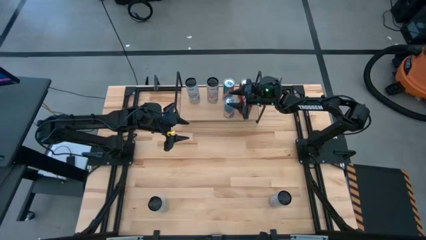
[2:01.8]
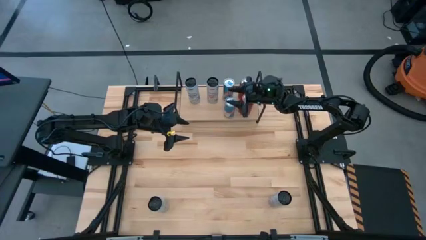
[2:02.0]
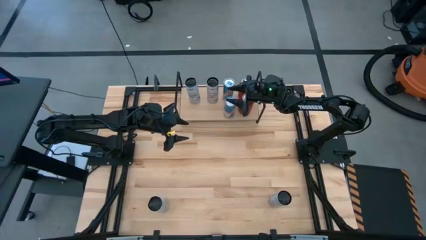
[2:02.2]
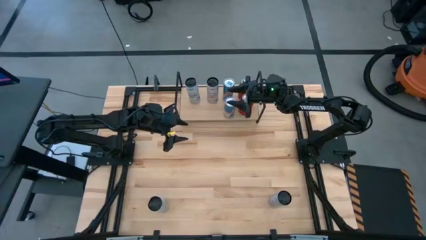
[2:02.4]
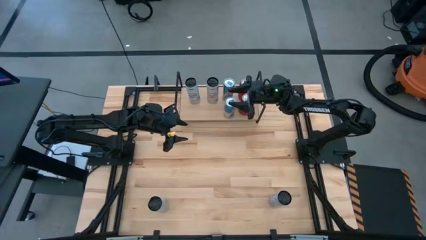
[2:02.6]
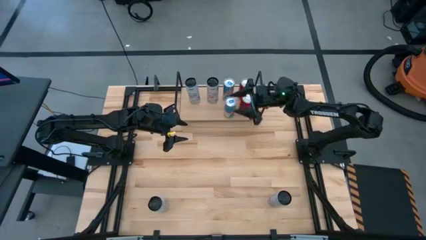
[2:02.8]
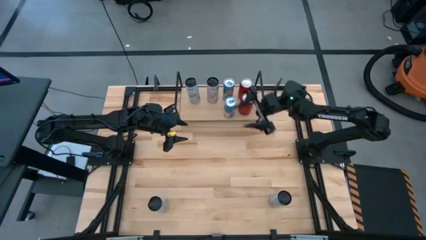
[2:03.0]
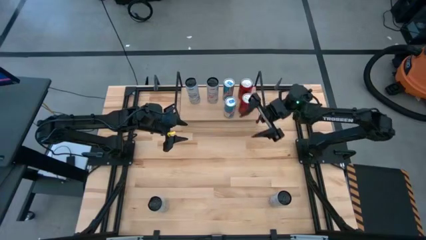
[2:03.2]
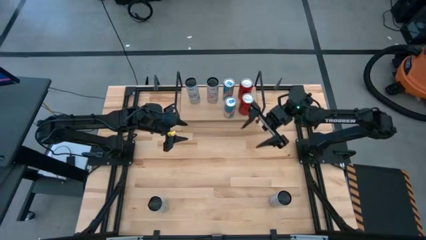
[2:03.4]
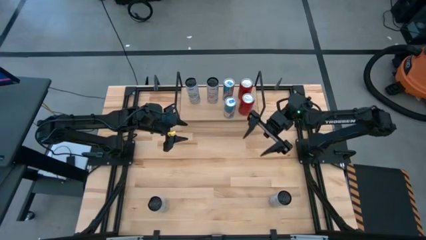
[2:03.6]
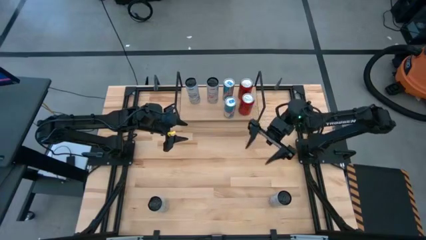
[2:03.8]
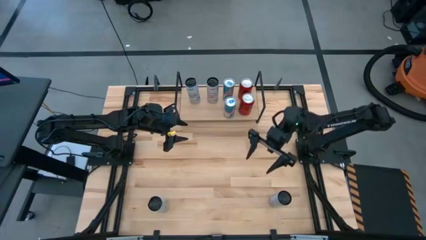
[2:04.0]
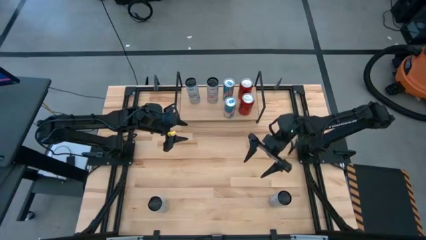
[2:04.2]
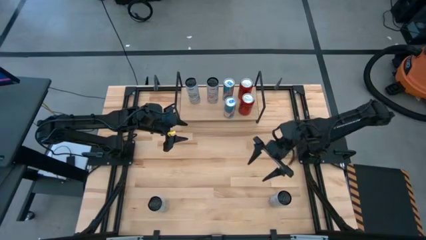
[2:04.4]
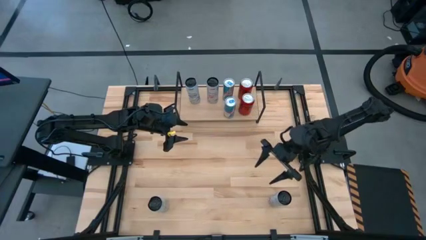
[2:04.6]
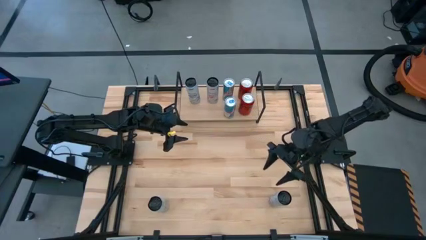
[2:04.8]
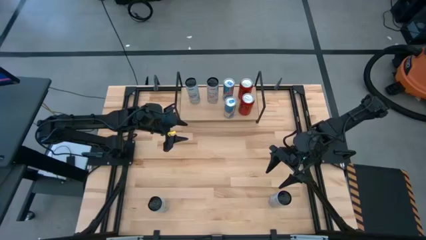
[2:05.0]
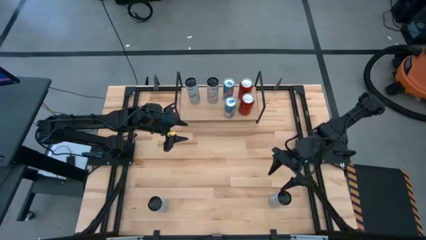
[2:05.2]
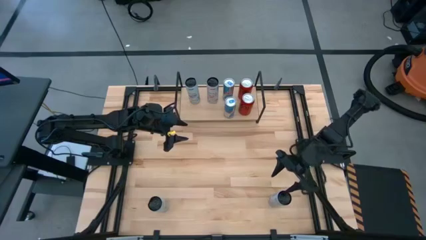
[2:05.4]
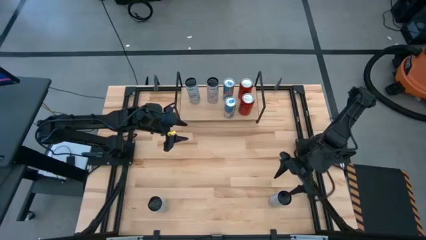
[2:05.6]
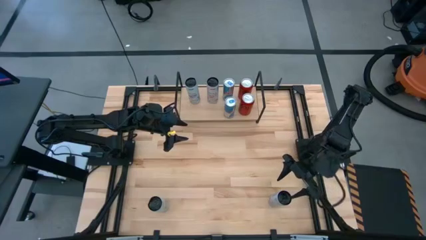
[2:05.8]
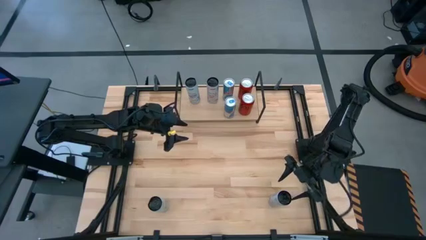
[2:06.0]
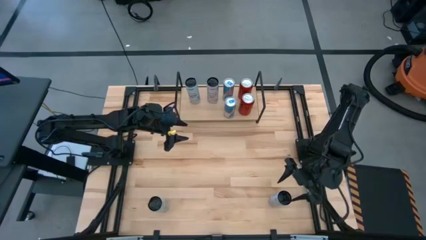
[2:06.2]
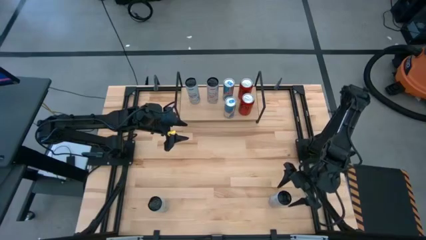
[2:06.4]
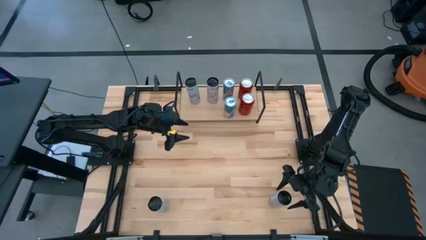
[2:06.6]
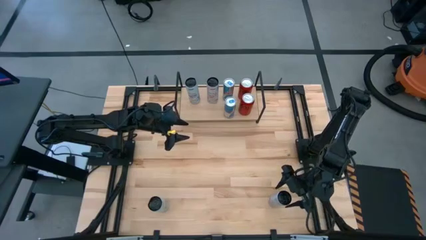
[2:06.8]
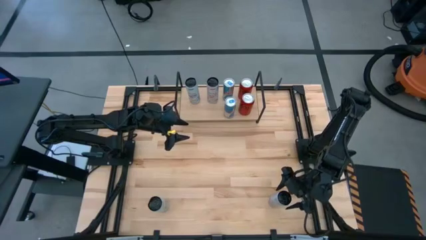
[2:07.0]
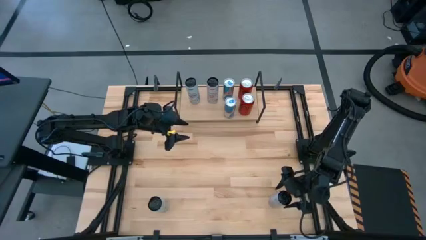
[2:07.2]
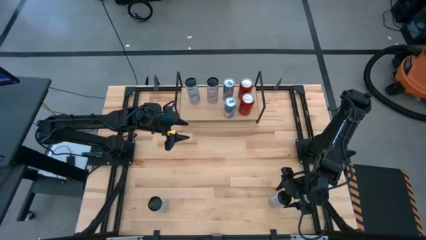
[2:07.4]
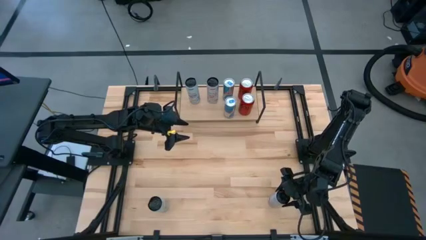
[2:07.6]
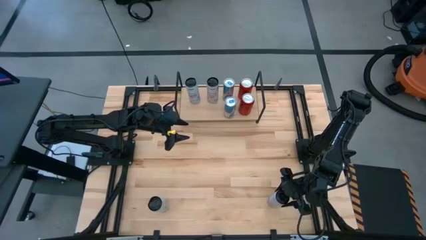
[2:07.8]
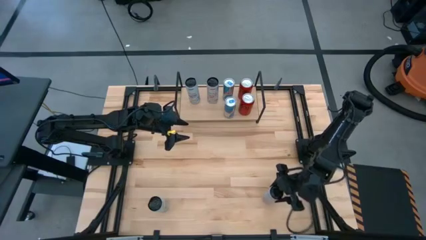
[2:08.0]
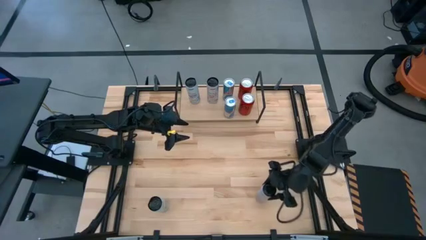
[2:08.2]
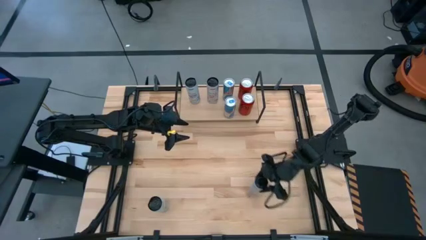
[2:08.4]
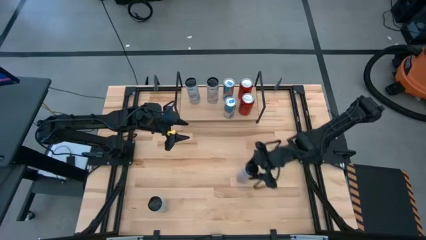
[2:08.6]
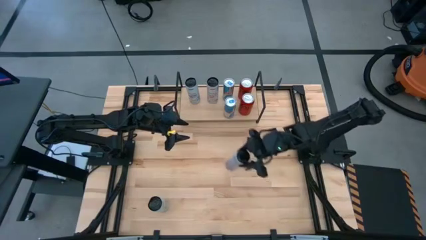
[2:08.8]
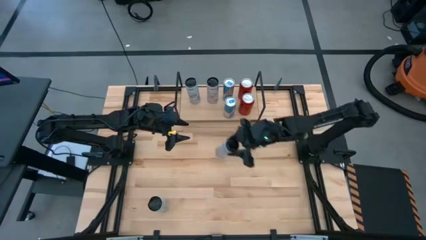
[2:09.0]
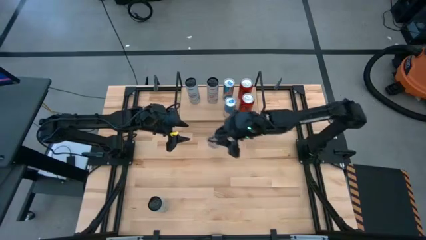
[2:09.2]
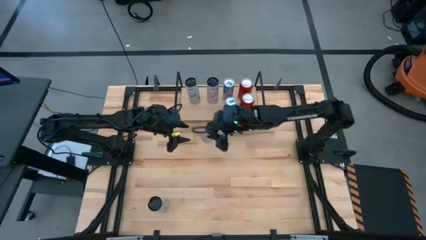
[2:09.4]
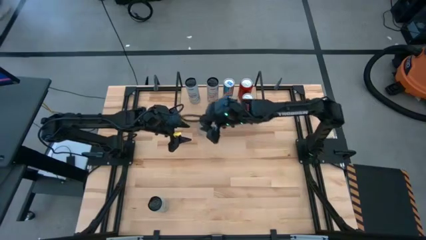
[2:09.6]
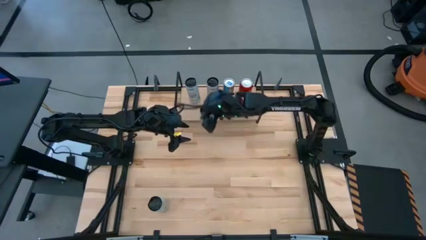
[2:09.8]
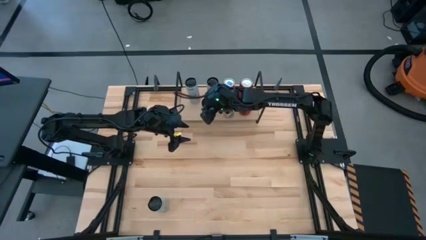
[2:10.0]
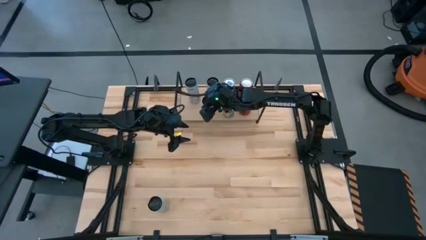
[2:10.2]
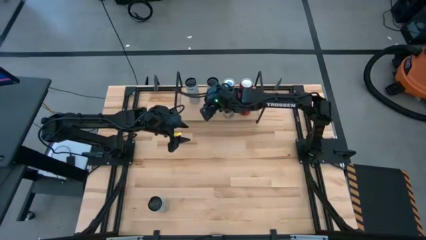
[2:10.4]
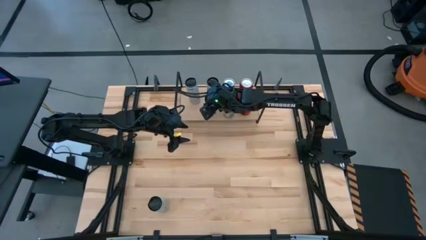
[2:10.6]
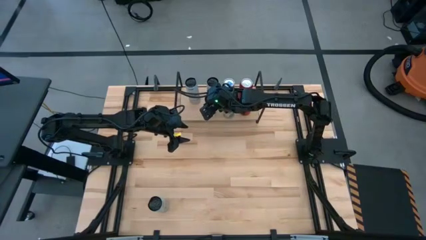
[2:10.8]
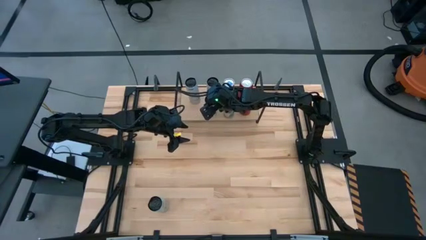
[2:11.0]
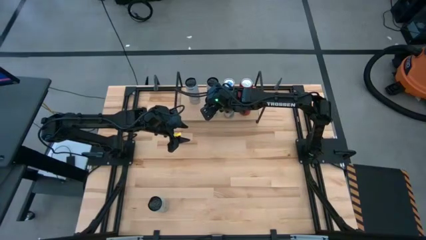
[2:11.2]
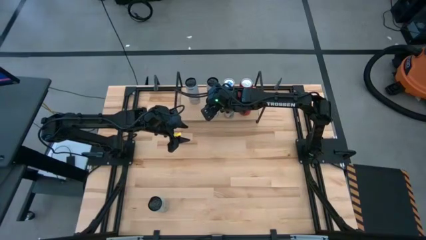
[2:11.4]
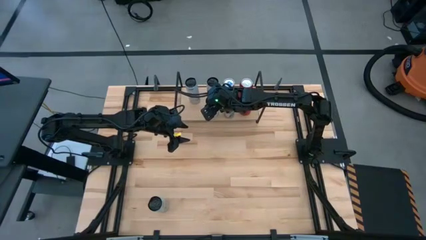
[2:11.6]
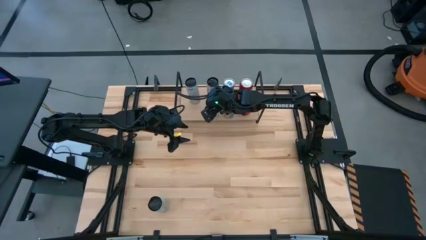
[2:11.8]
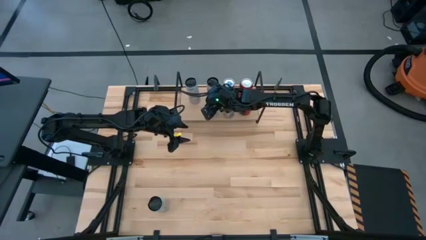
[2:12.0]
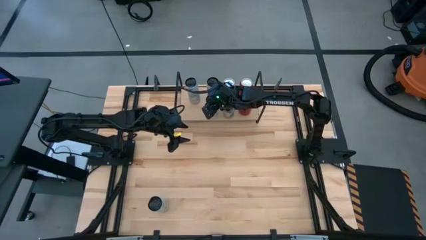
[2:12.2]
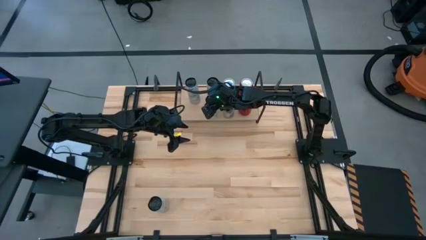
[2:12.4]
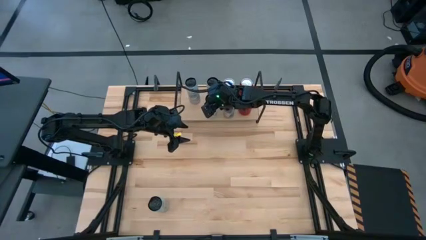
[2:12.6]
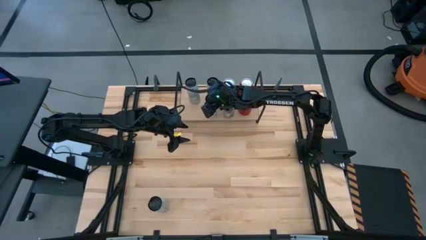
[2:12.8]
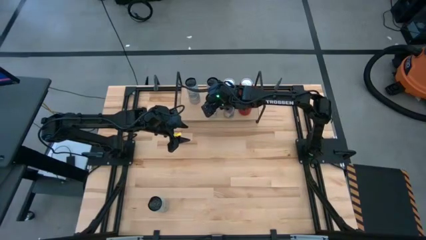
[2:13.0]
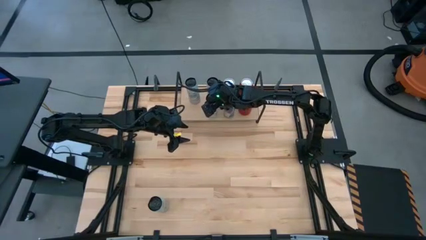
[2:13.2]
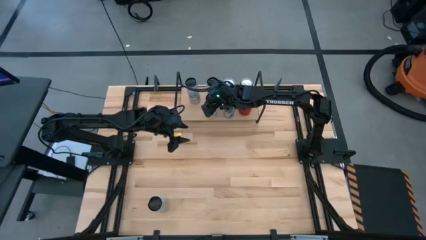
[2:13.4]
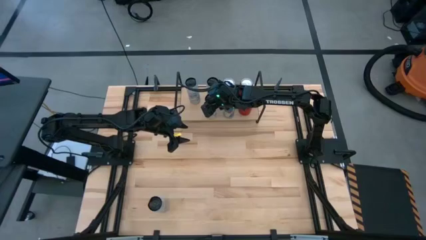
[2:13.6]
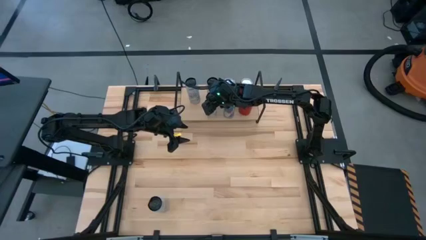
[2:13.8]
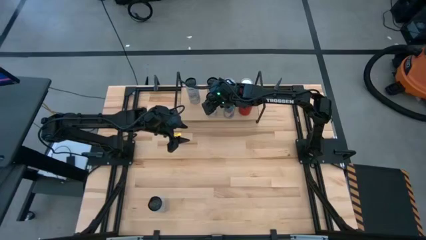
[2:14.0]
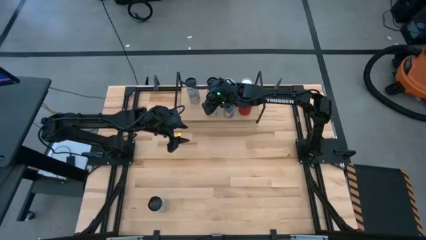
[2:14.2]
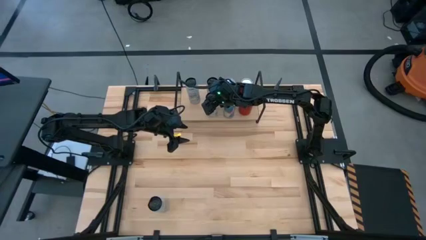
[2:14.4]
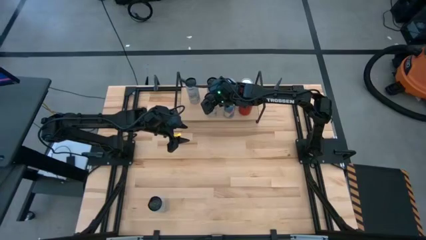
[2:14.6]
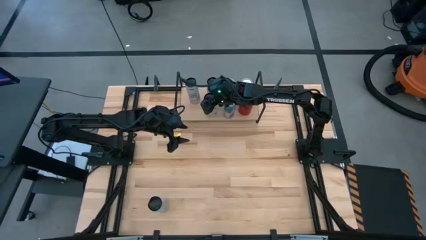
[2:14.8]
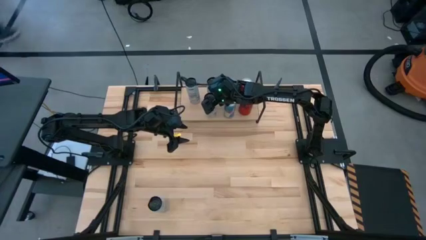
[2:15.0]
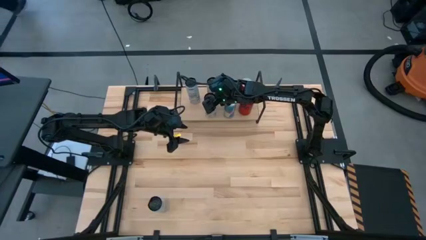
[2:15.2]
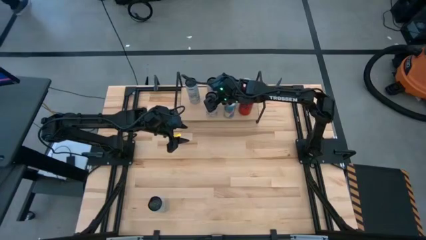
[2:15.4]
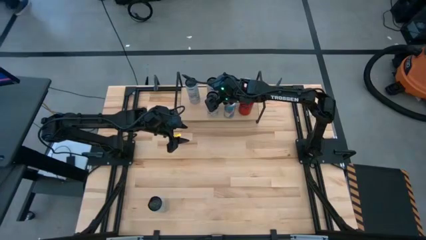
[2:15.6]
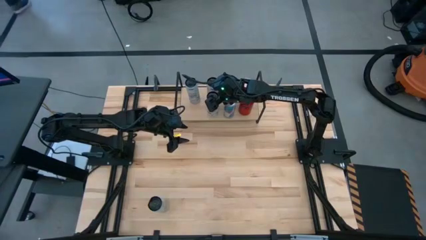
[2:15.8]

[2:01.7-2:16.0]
Task: Place canned beverage on shelf
Put the white and pink soda can on the shelf aligned with the other white and pink soda can

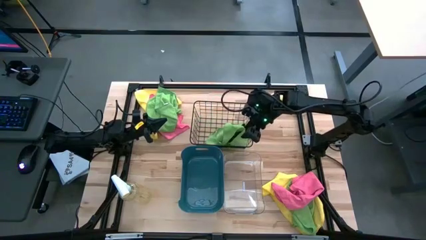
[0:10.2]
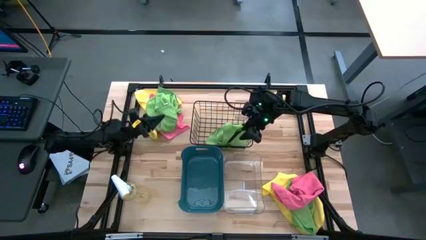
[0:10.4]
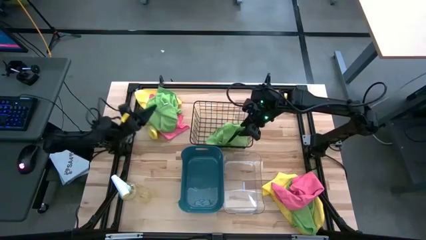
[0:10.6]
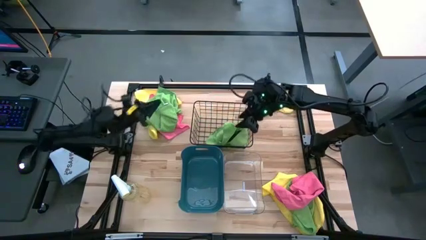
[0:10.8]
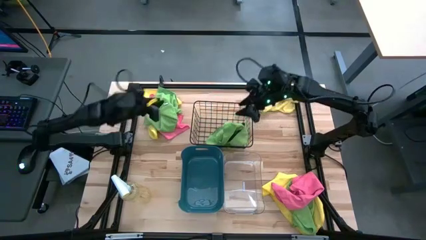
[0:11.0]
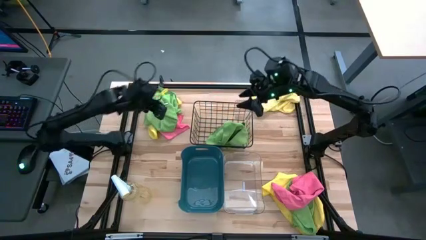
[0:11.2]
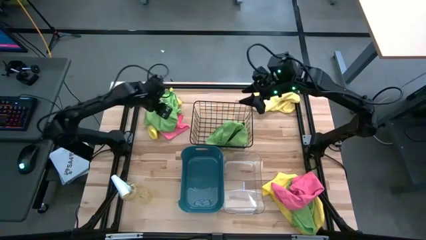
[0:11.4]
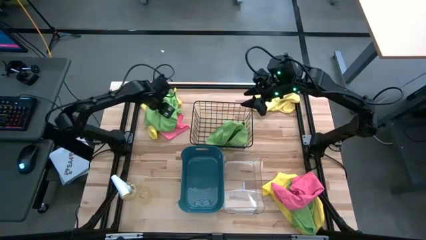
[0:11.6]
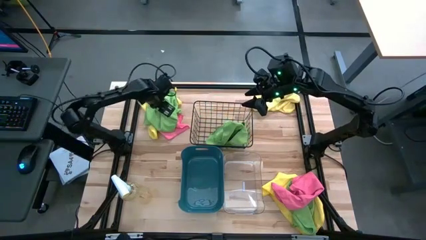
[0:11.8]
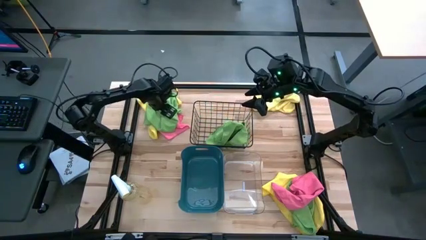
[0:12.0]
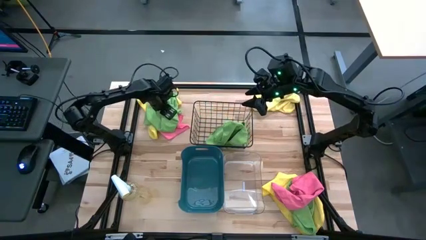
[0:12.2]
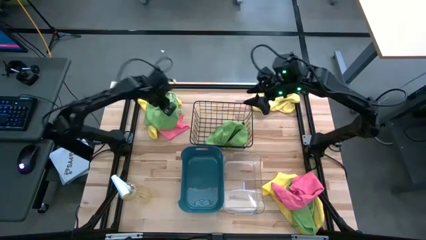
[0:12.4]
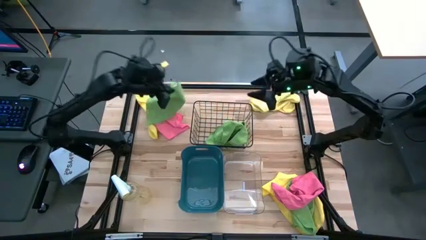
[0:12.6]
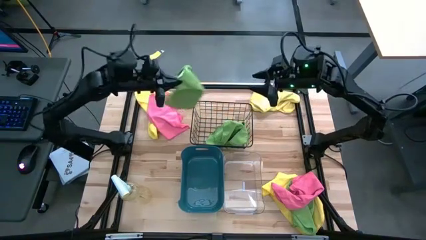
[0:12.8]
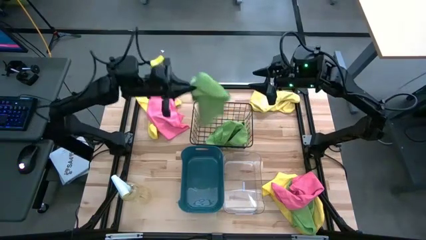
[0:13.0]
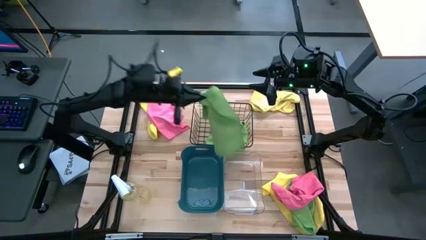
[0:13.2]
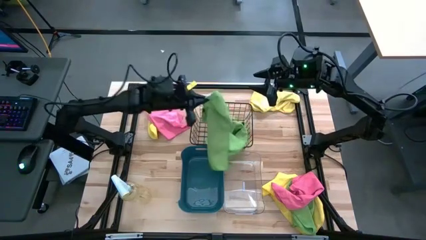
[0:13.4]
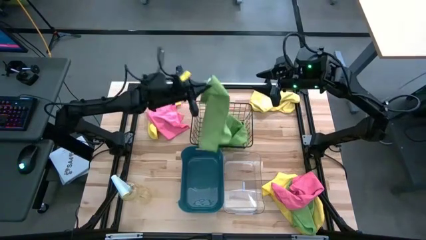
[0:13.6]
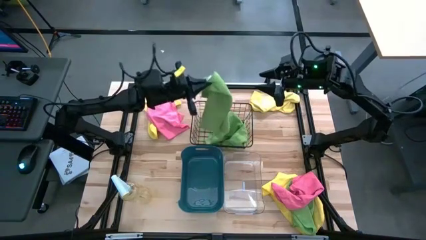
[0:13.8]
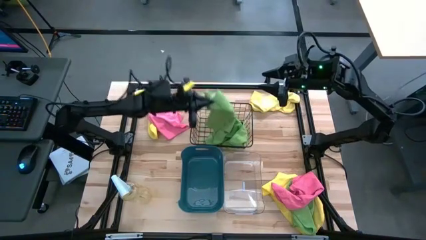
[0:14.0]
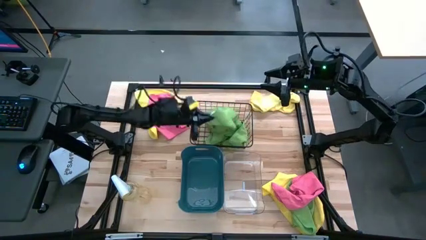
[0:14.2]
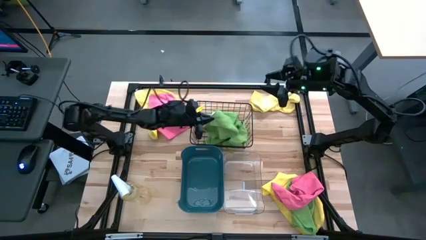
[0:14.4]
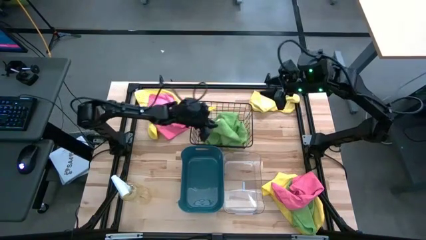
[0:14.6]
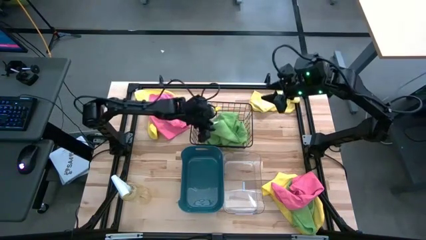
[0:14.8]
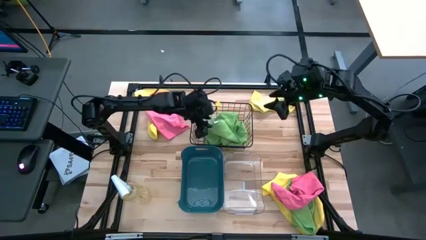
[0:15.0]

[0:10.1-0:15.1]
Task: Sort microfiber towel by color & place in baskets
Put the top green microfiber cloth into the wire basket
